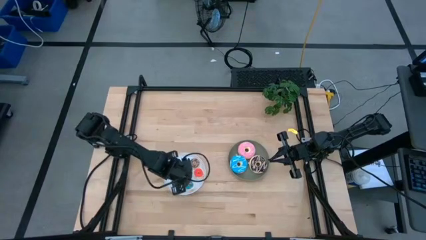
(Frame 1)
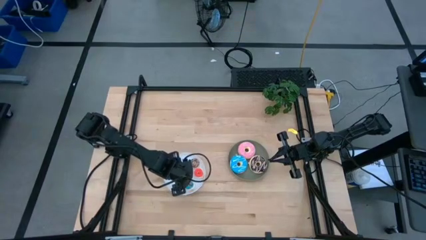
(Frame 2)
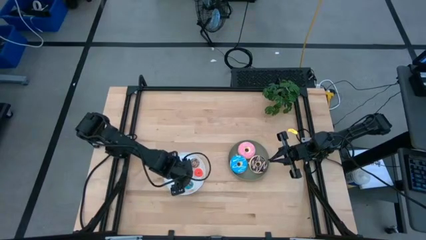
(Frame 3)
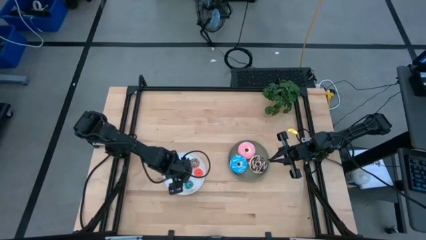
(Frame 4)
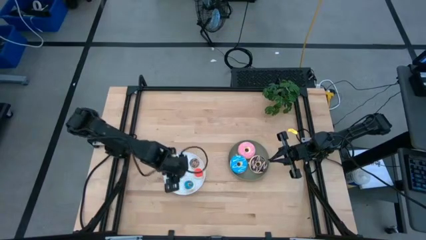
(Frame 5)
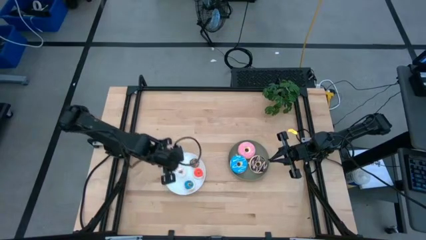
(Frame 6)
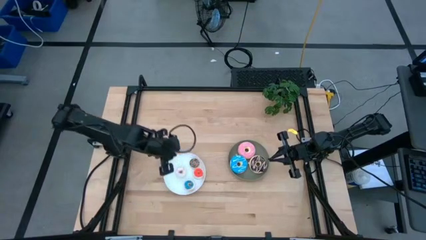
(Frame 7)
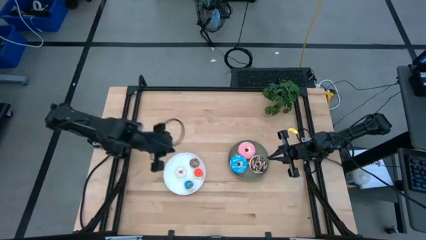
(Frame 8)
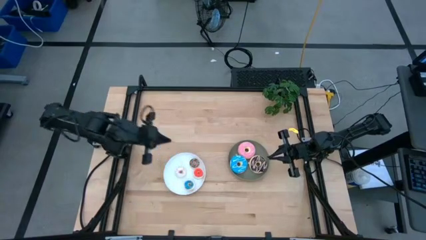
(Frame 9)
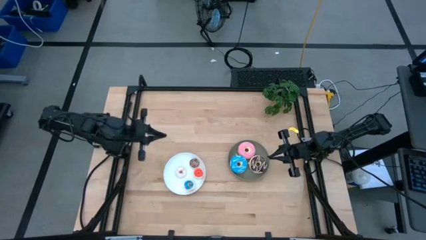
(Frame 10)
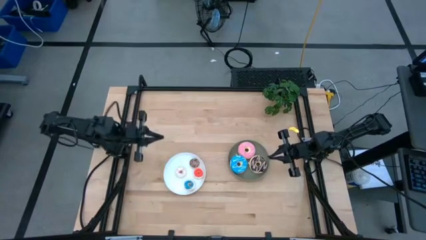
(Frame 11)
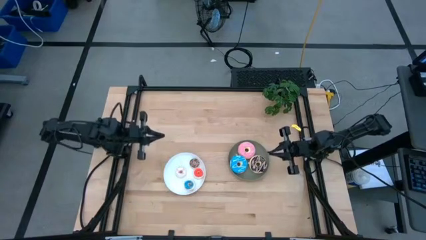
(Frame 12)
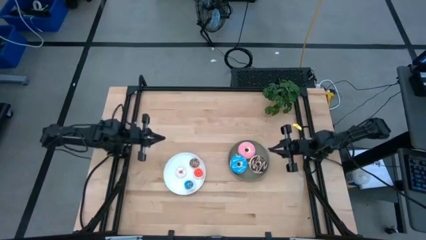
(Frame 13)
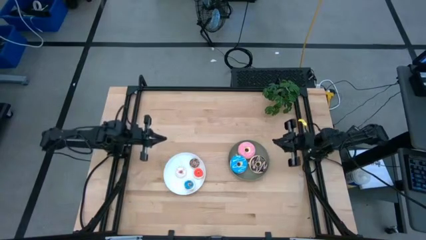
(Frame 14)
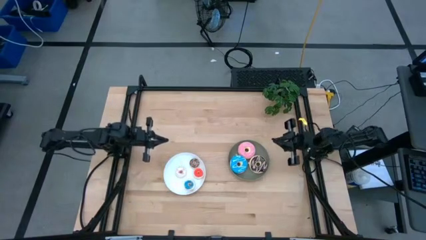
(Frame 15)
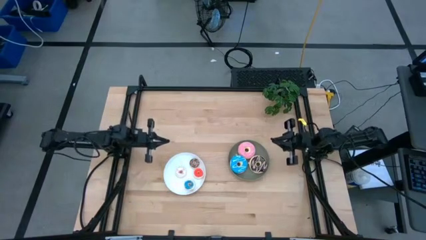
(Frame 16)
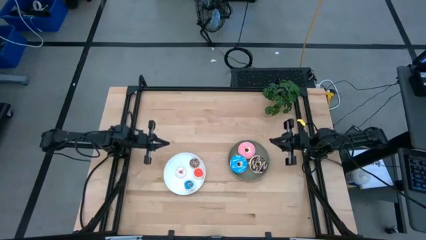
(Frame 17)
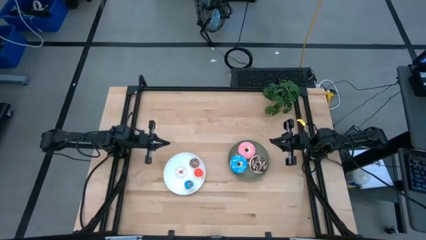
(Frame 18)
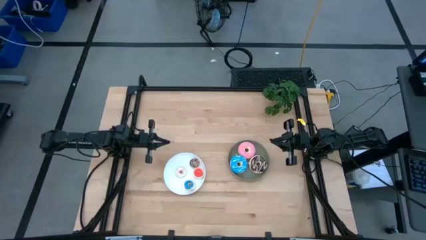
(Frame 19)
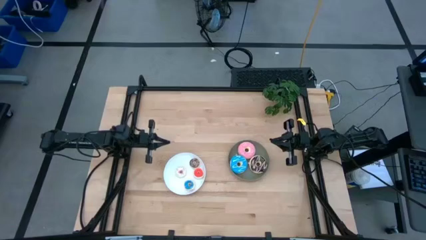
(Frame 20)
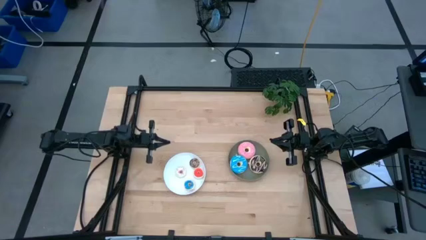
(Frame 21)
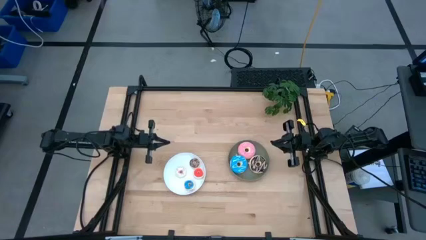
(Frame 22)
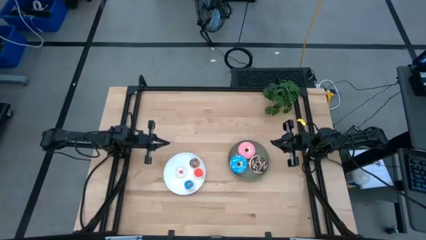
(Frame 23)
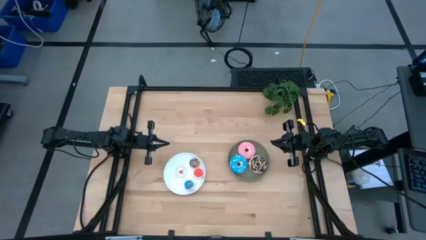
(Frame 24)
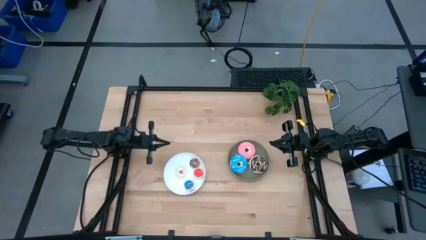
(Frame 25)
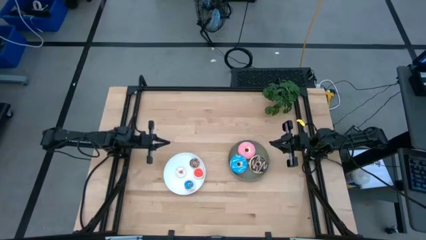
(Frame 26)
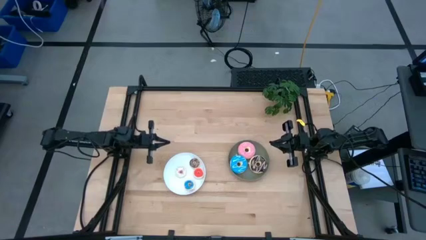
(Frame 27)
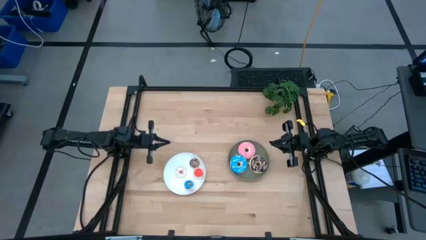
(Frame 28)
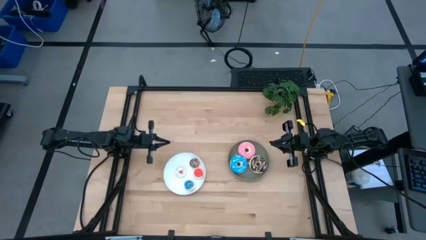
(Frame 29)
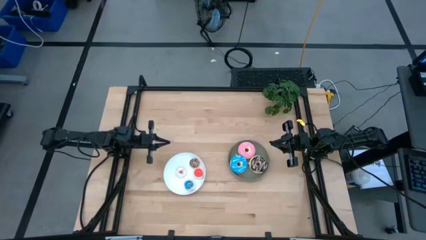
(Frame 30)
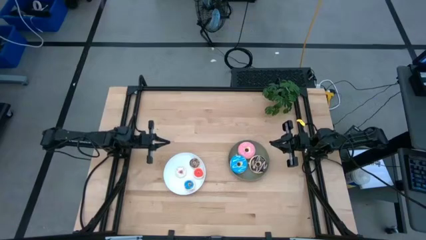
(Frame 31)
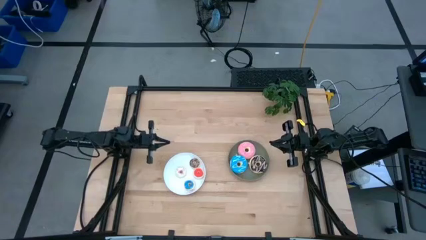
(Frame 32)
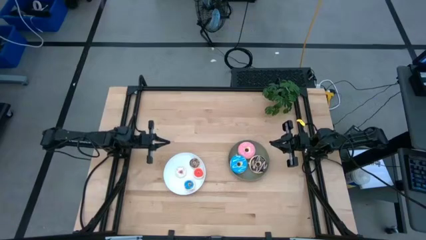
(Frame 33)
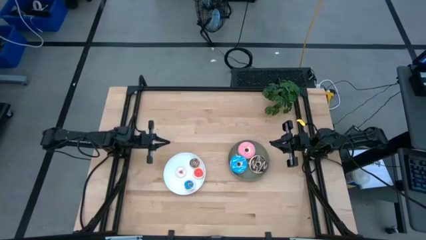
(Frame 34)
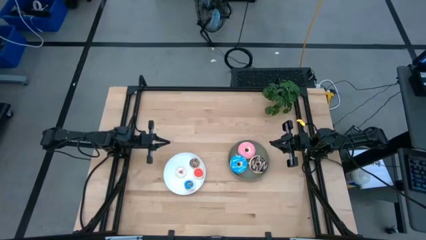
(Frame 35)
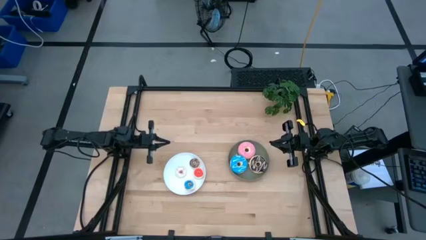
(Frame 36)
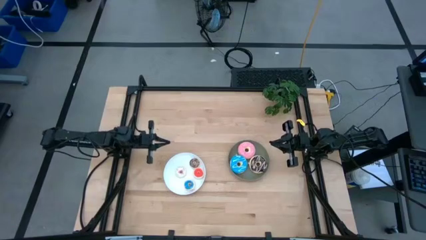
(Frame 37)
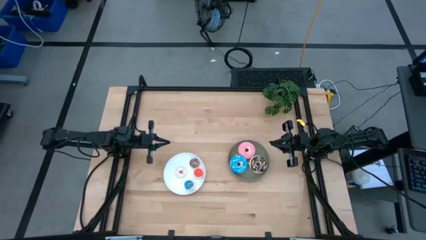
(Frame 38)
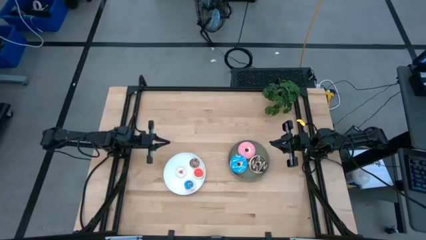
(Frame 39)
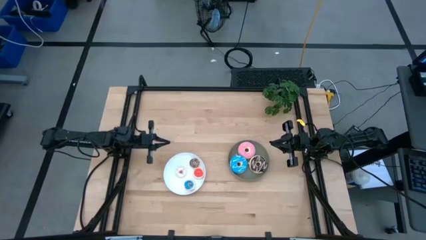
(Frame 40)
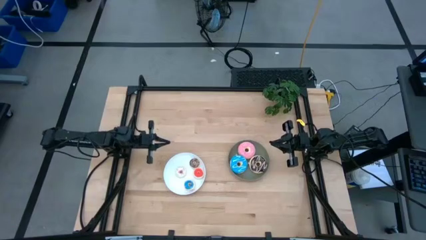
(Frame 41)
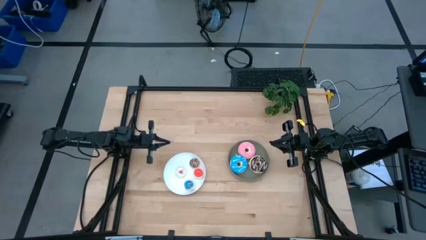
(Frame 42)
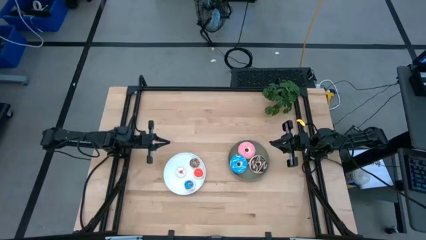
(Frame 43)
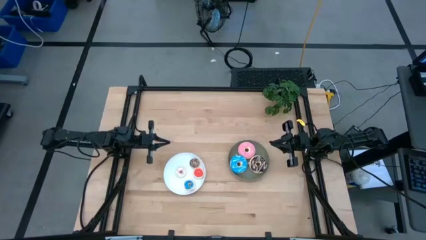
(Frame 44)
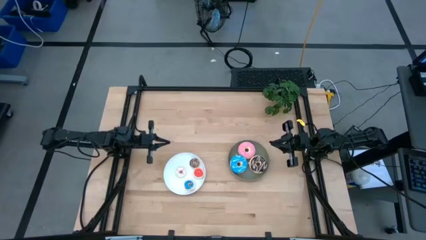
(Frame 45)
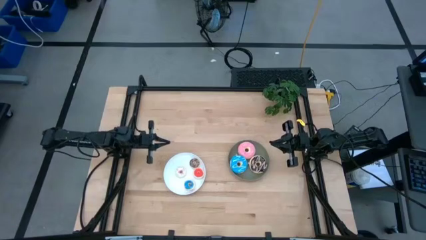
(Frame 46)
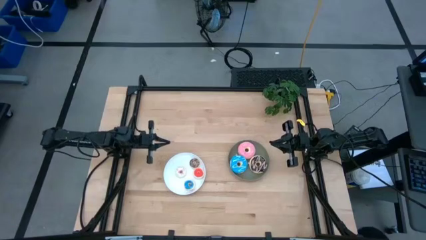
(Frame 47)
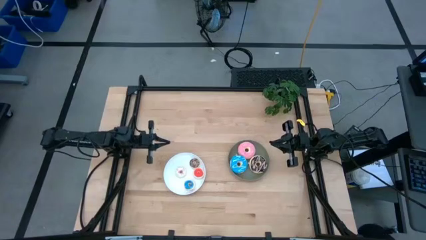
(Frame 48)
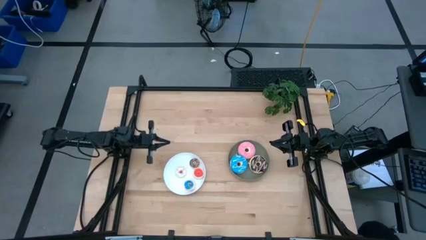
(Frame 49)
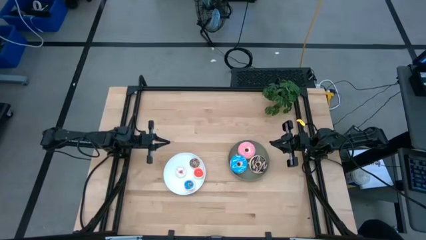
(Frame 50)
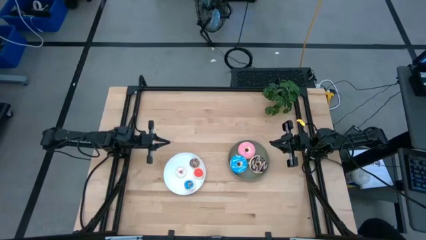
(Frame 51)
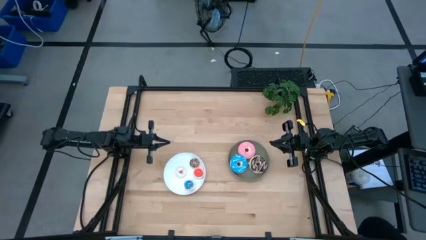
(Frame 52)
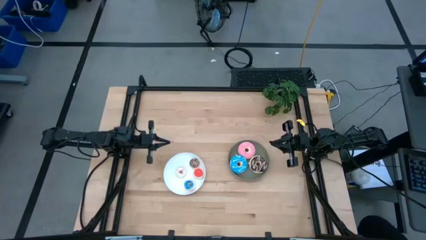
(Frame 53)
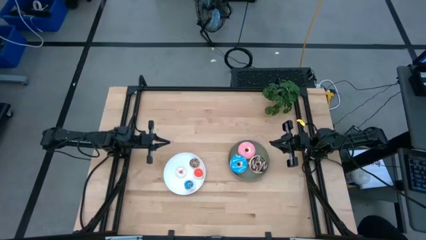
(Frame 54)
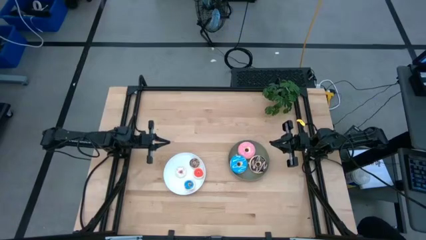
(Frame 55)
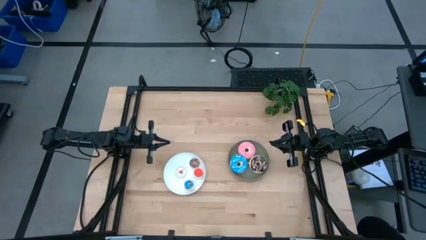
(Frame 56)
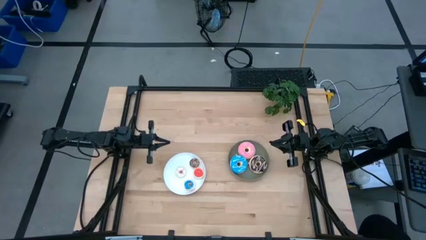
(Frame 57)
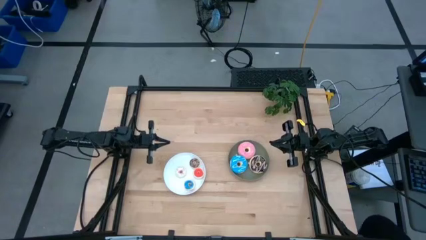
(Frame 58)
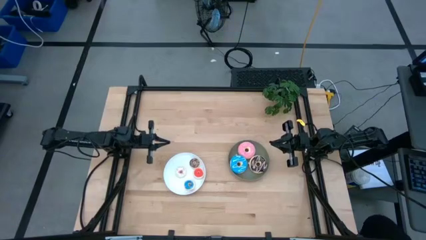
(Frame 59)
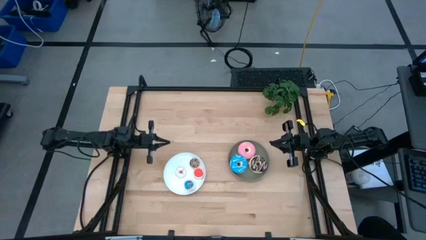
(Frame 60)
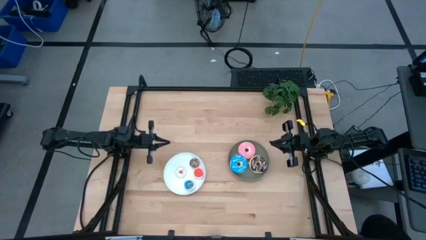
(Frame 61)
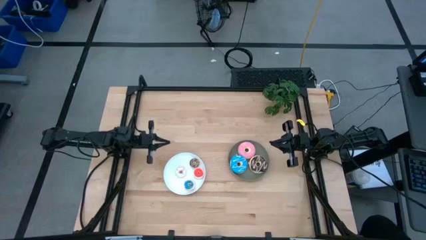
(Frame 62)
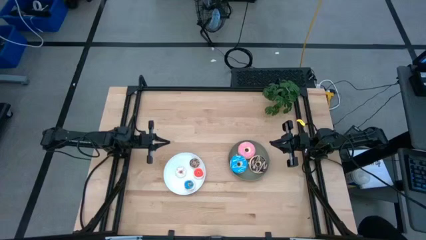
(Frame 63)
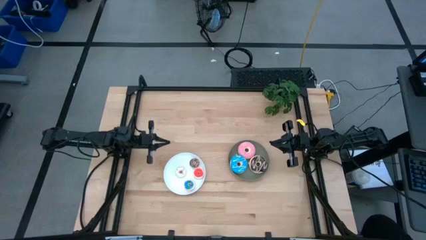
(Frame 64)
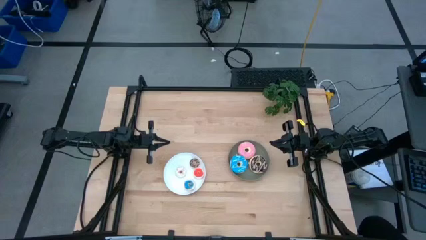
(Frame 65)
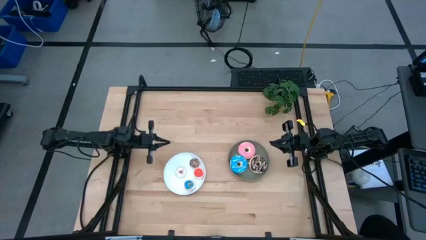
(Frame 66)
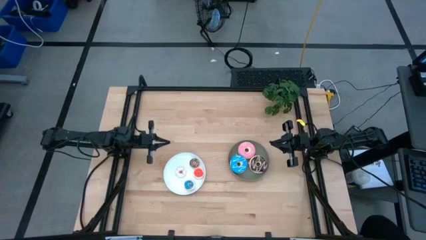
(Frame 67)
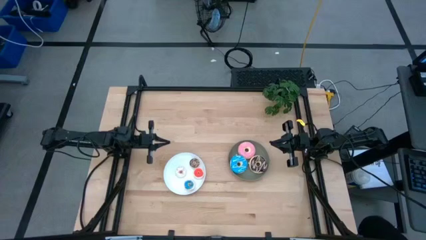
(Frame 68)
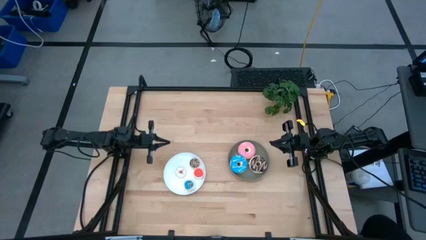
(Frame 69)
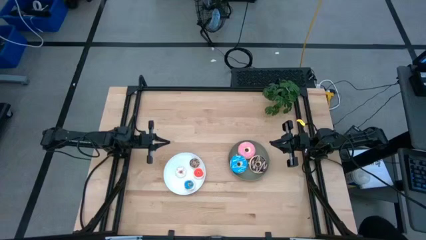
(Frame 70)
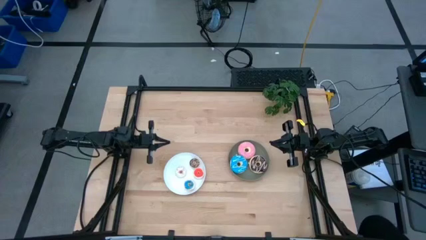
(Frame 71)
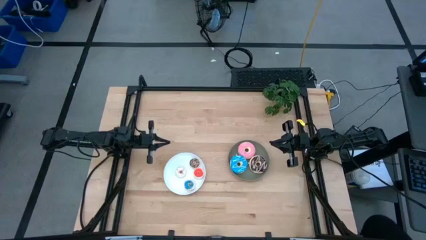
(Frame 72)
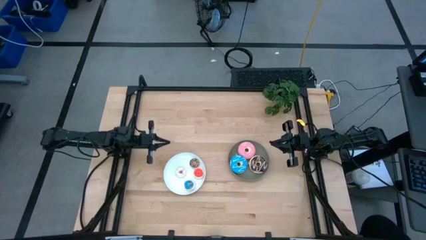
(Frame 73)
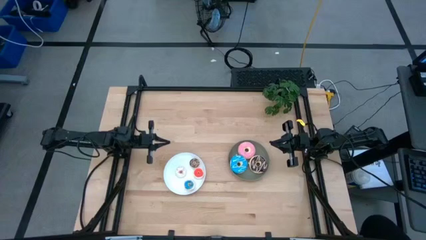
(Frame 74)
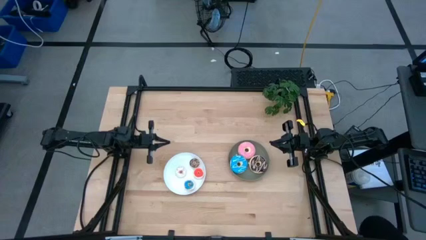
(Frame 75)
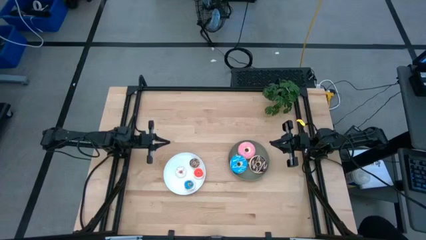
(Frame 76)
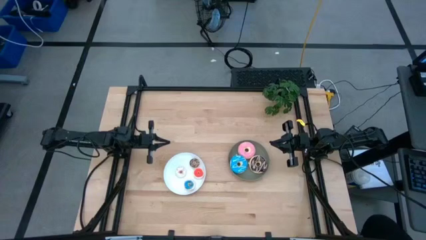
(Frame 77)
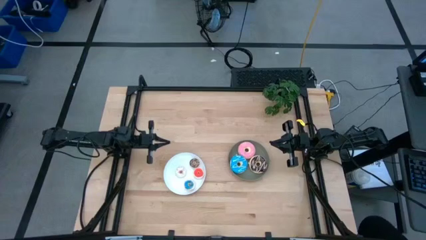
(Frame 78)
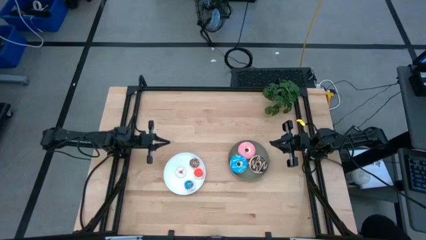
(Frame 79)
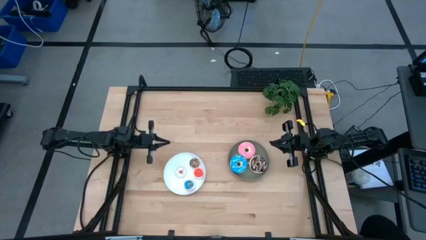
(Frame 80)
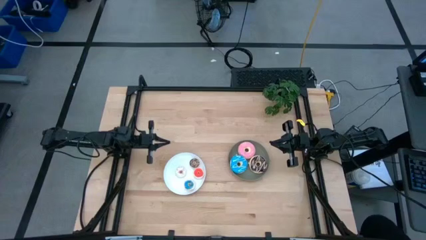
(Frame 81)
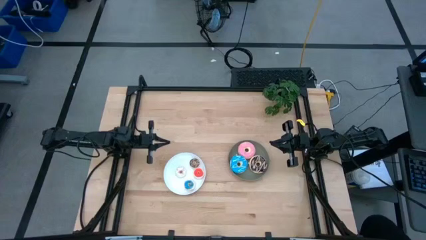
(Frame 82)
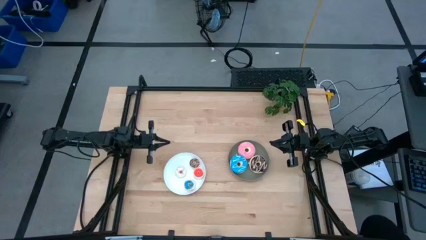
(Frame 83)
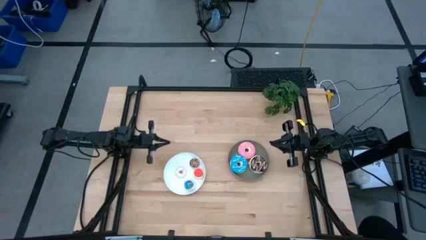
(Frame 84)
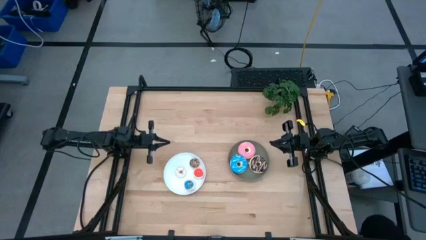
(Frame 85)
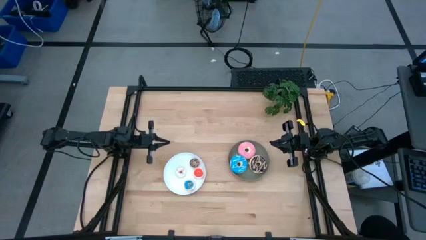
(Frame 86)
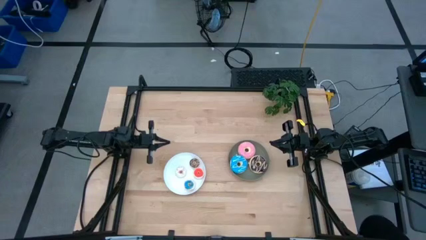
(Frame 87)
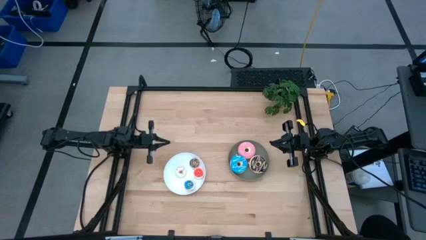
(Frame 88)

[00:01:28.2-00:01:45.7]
Task: Pick & Place donuts
Return to Home Position
